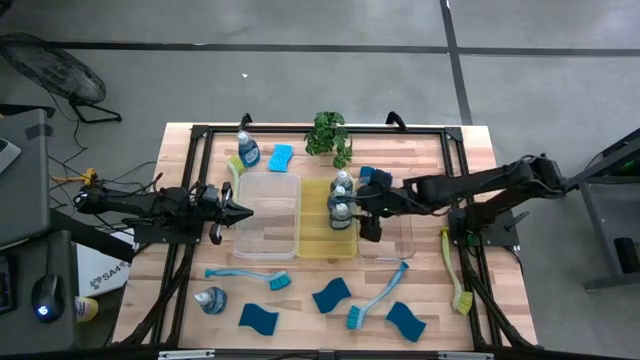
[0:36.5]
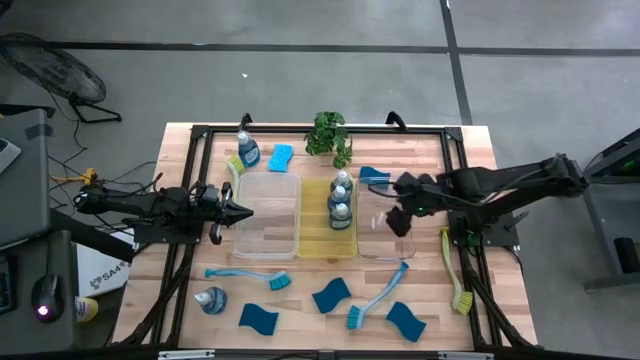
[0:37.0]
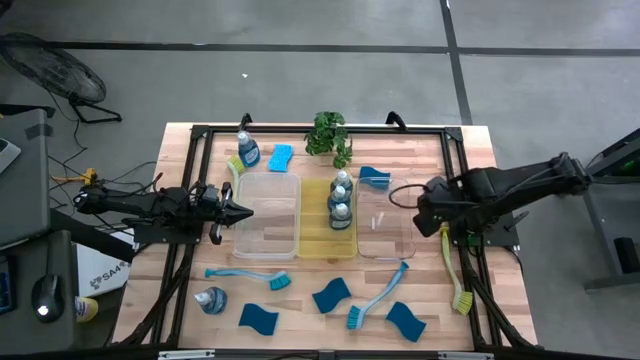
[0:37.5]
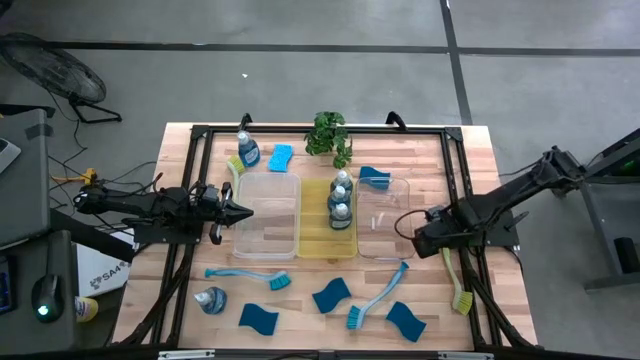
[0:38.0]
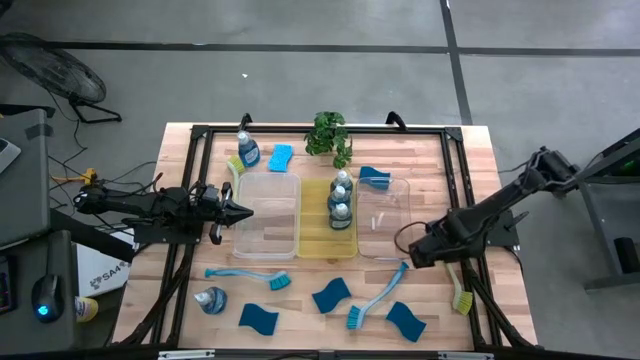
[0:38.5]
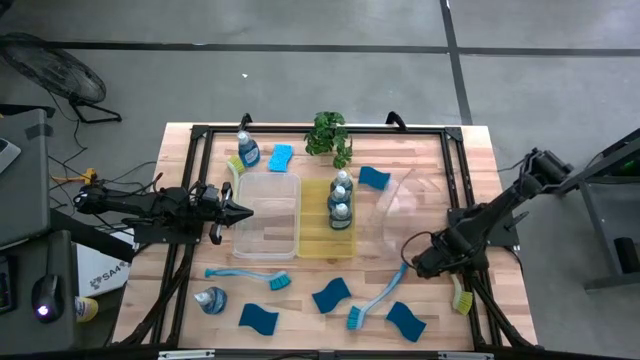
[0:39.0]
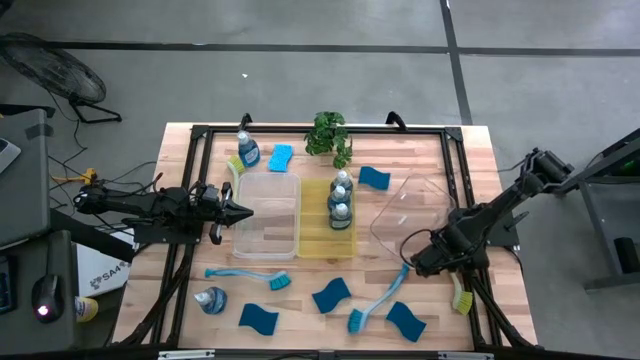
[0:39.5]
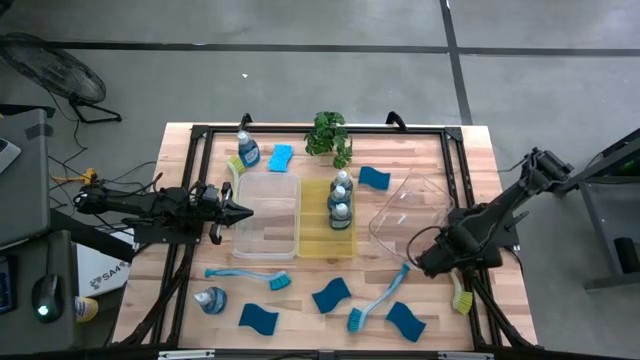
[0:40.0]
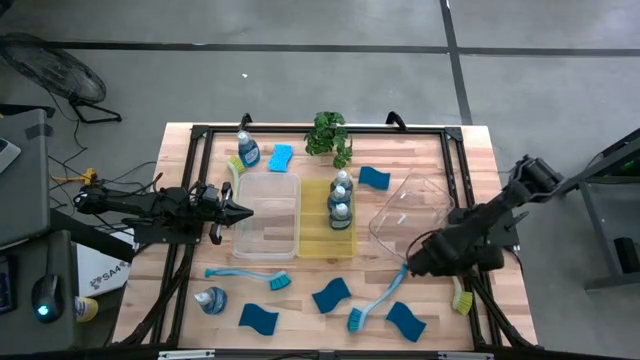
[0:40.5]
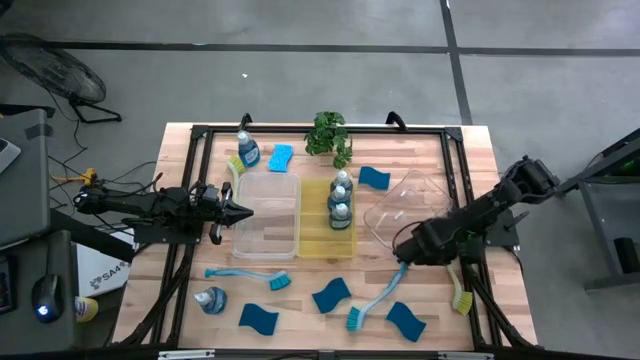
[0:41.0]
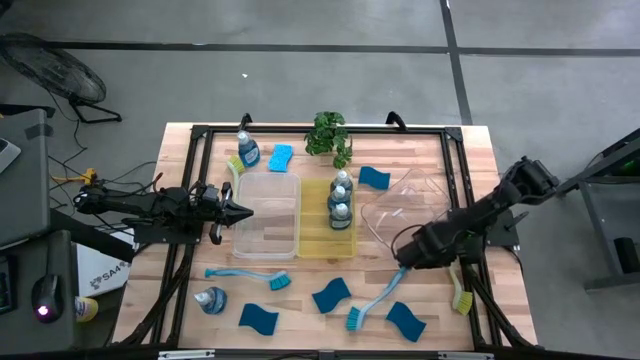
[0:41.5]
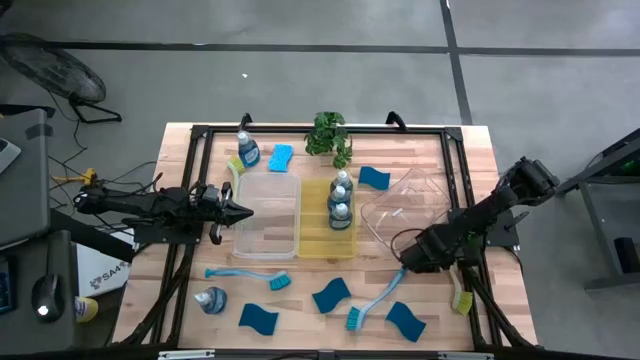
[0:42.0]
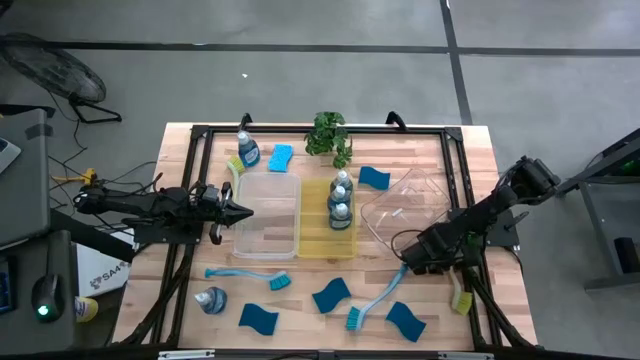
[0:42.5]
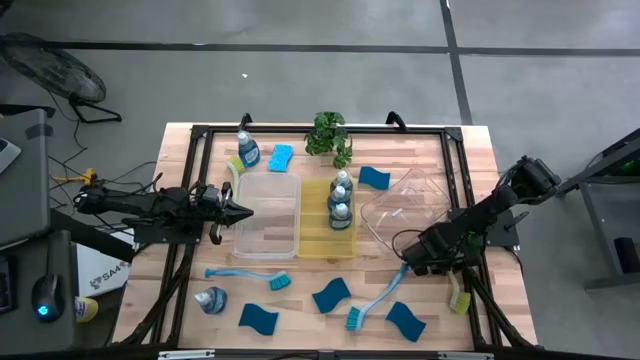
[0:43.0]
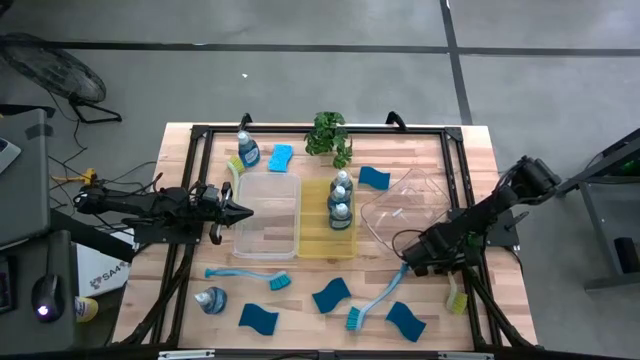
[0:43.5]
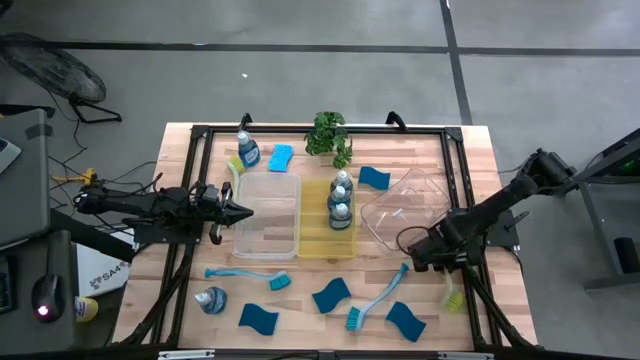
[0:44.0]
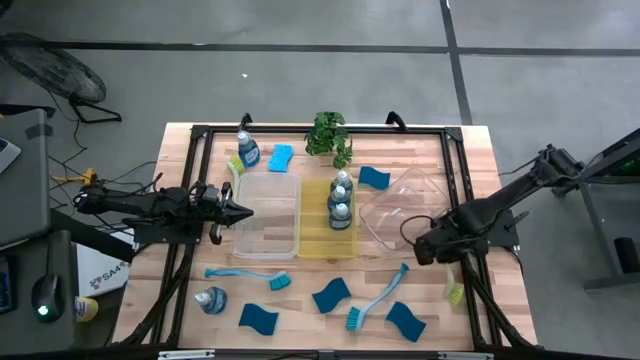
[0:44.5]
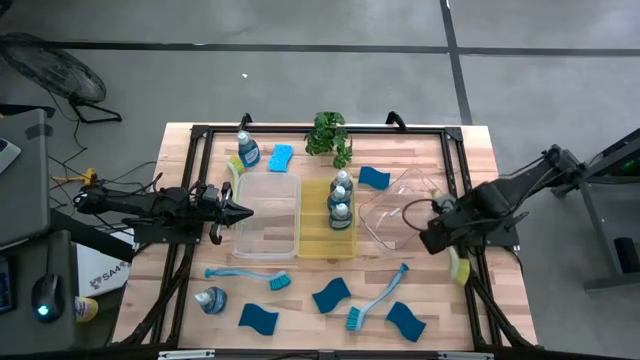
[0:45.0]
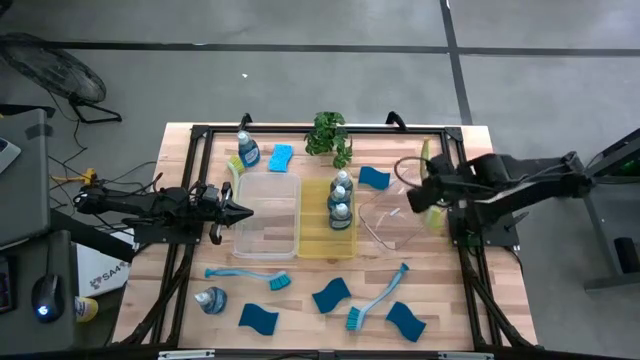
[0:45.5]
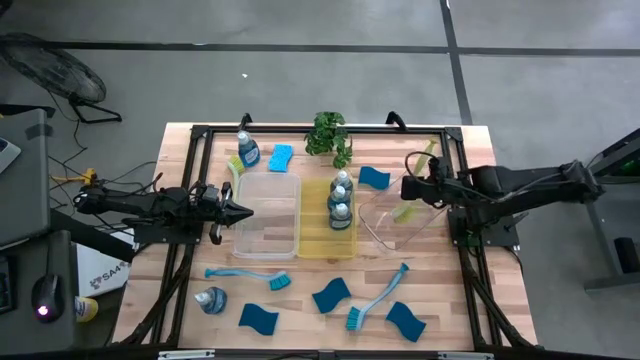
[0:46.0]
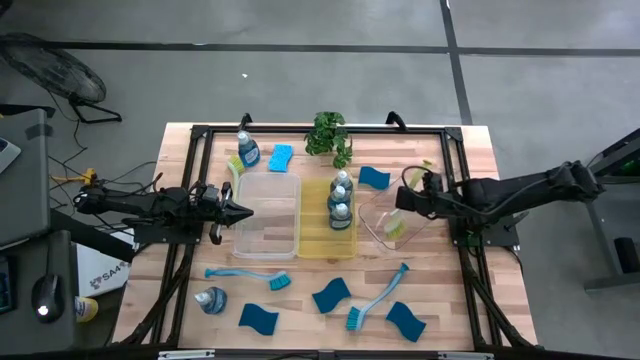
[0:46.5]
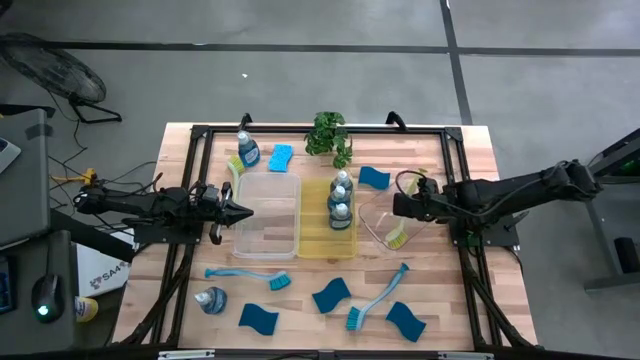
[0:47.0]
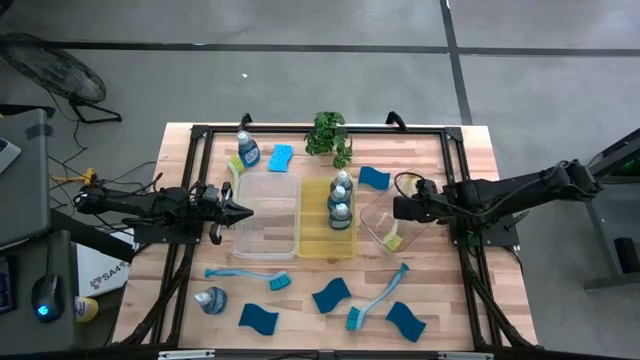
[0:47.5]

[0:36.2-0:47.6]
Task: Pick & Place Kitchen Sink Supplies
Put the yellow toilet brush into the transparent bin

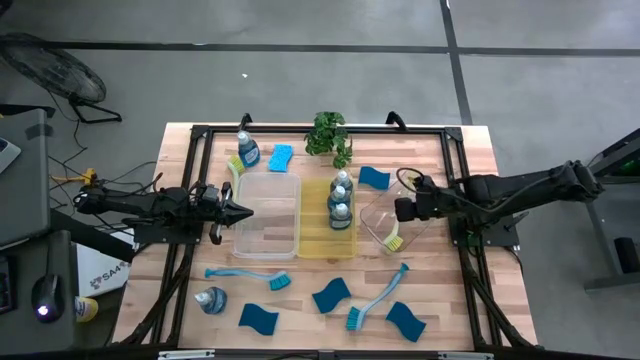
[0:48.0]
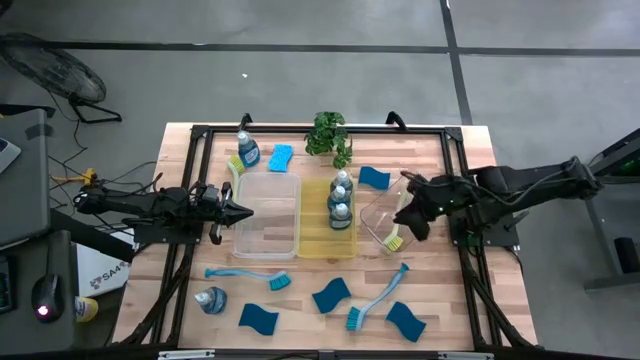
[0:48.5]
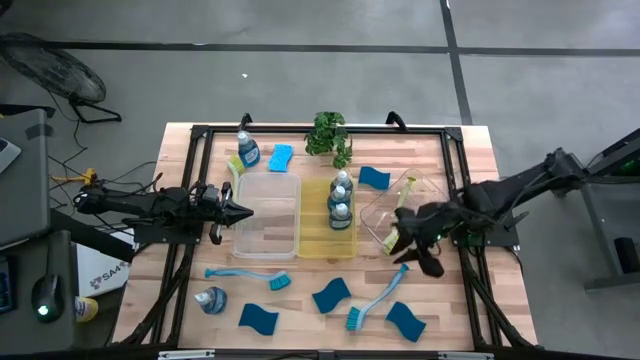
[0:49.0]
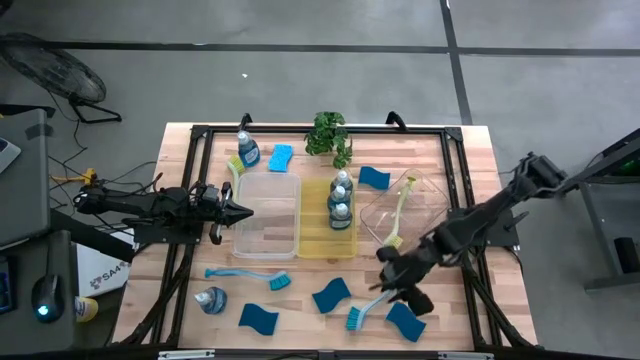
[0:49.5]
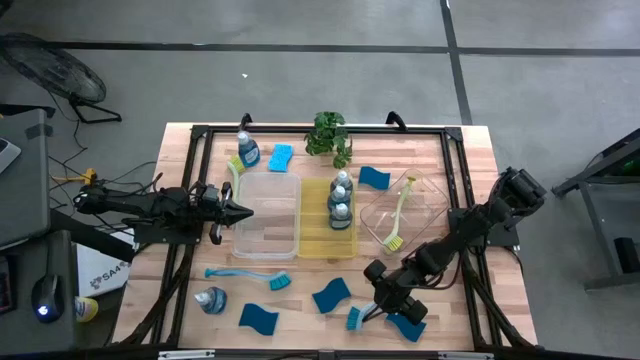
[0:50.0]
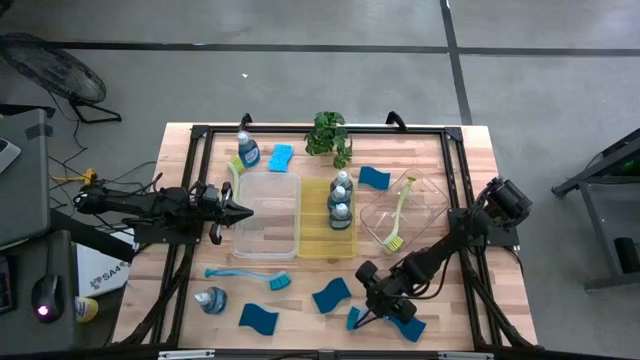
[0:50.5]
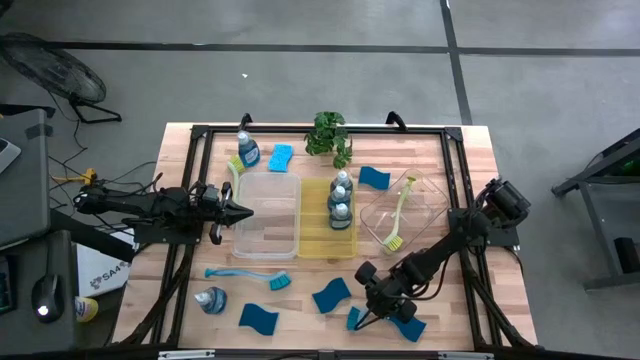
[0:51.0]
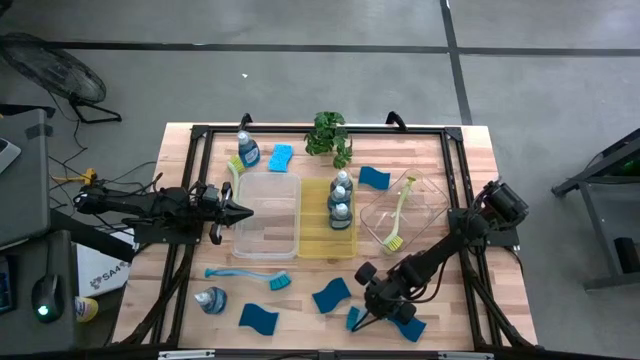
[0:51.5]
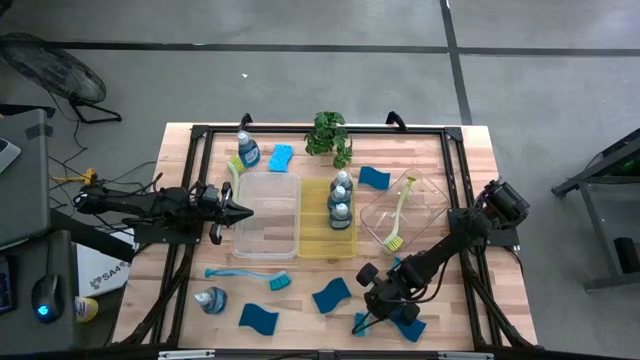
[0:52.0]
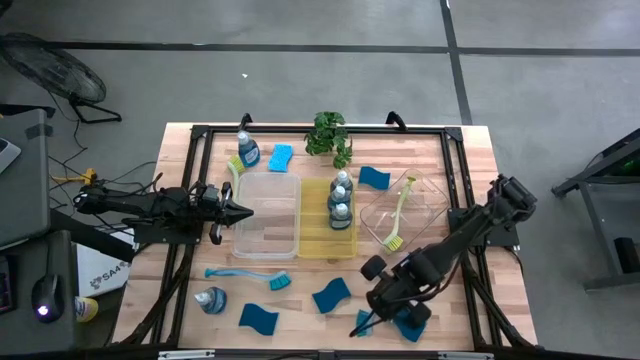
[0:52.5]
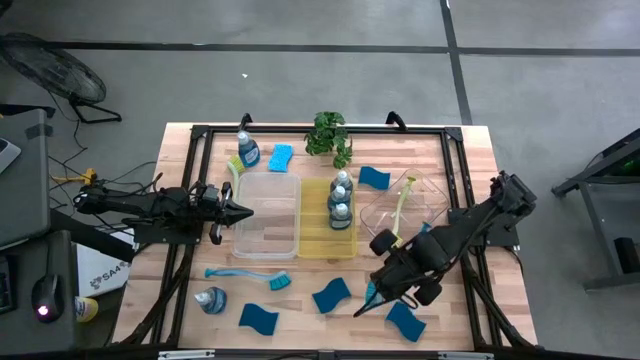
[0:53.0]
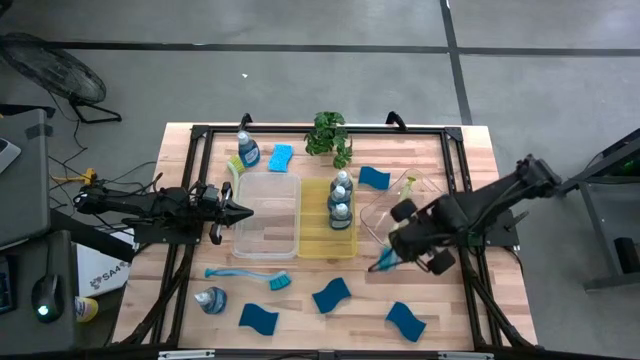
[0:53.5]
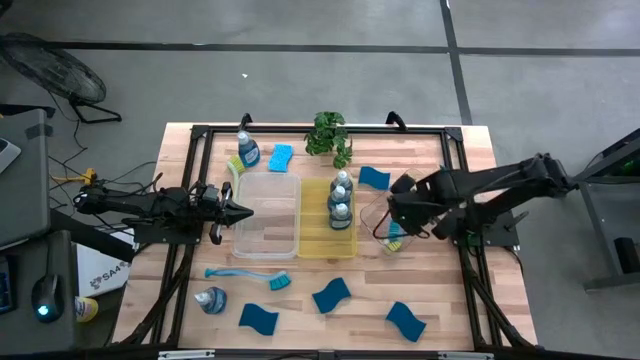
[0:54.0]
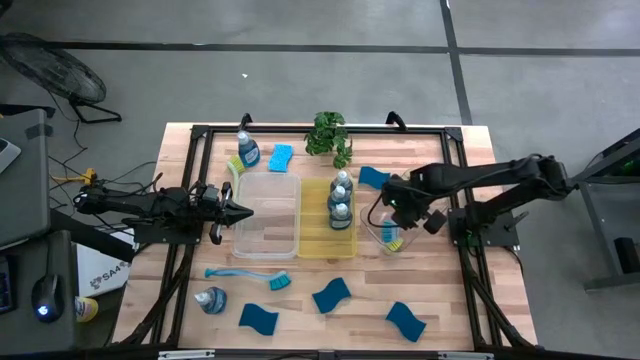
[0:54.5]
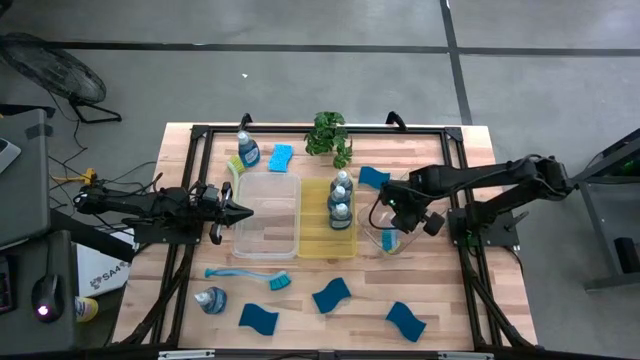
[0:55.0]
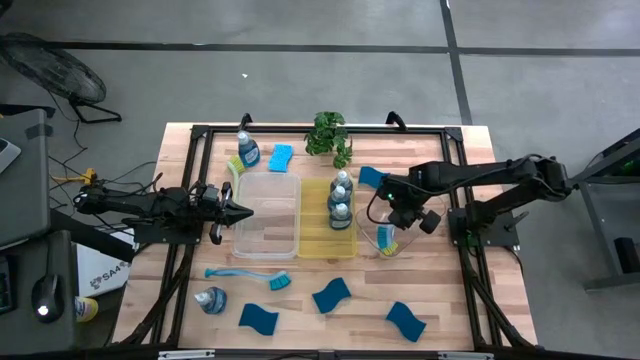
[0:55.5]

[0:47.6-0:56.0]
Put the blue toilet brush into the transparent bin

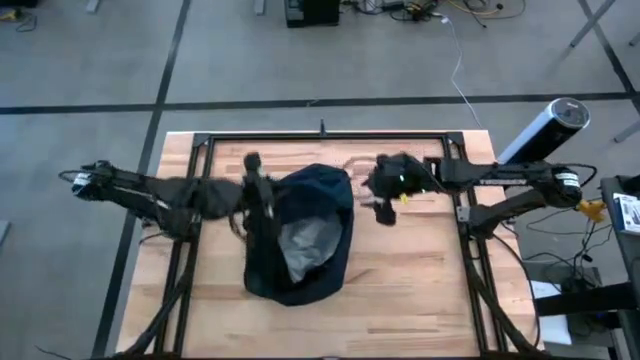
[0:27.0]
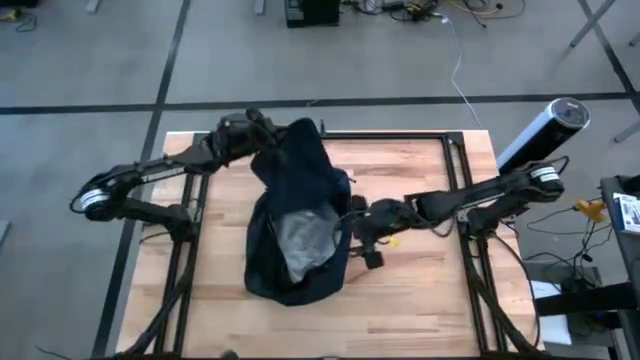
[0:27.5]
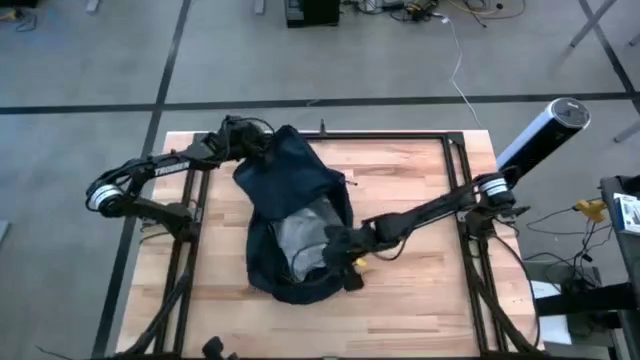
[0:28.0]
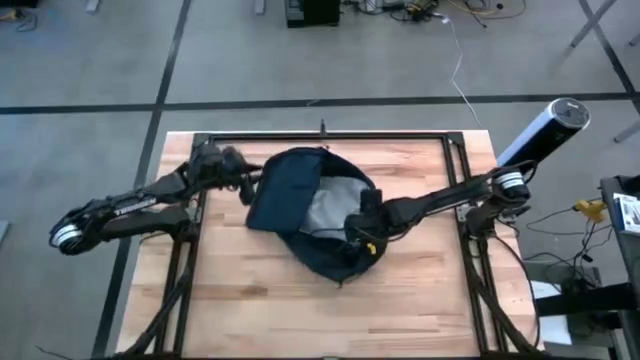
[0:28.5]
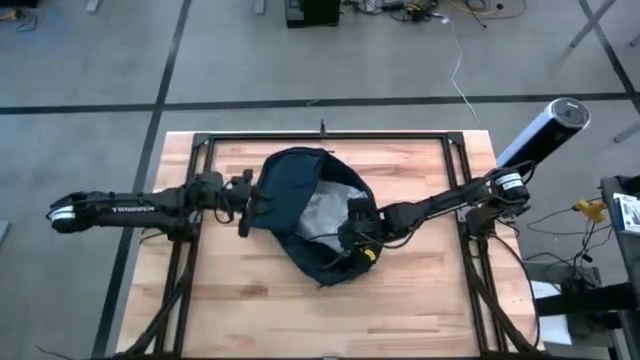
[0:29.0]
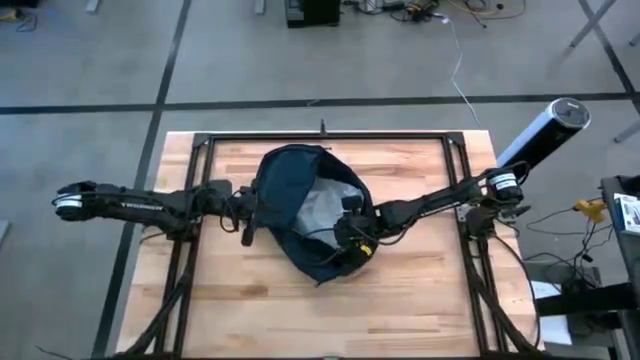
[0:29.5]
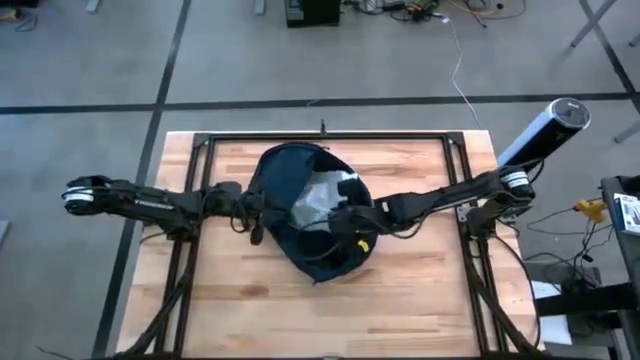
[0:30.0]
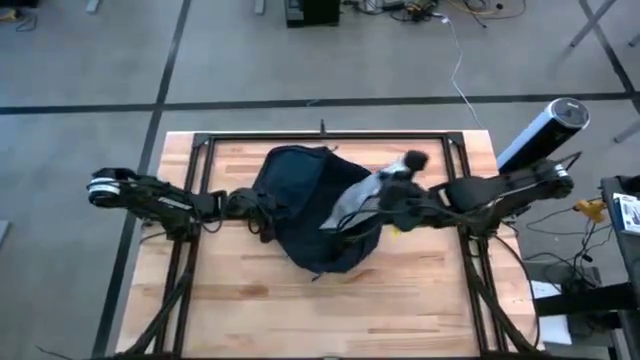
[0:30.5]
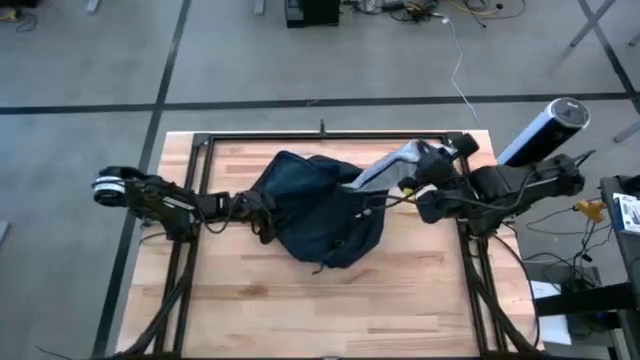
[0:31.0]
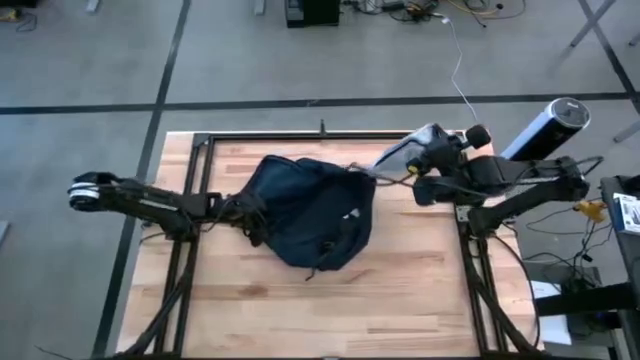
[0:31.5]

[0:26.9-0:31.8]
Task: Unpack backpack
Remove the white white zipper pouch from the blue backpack
